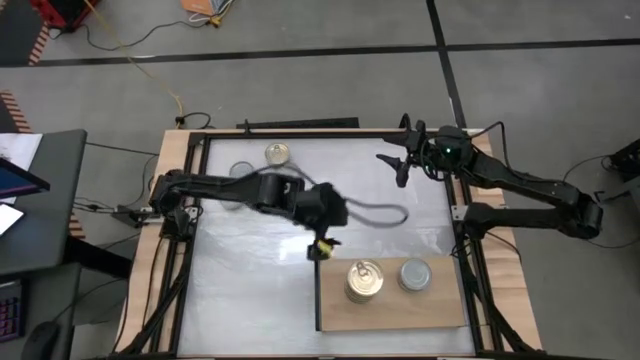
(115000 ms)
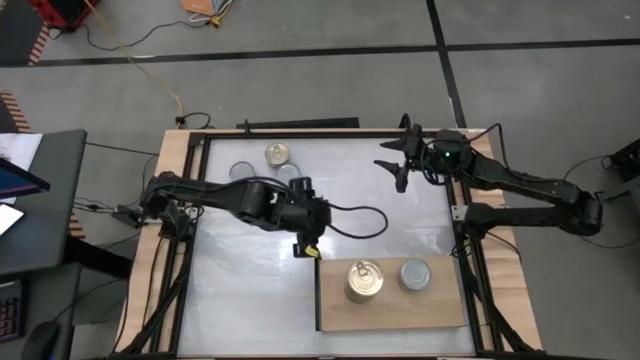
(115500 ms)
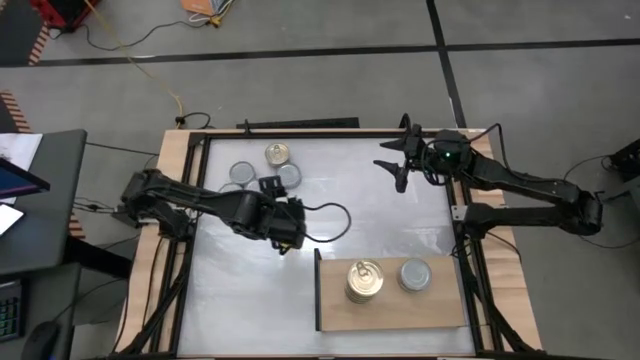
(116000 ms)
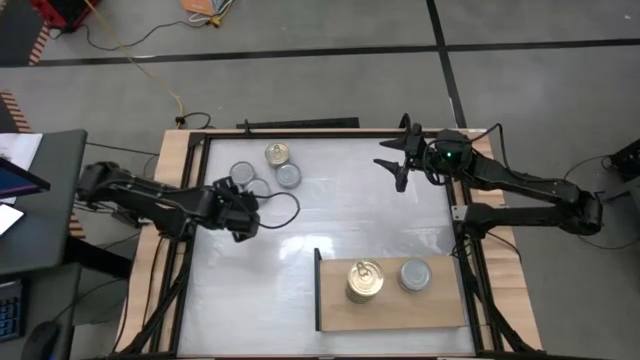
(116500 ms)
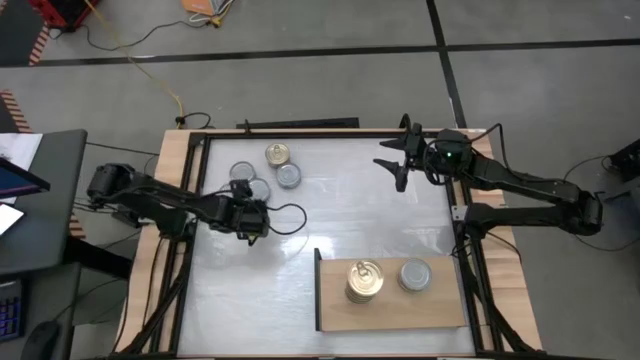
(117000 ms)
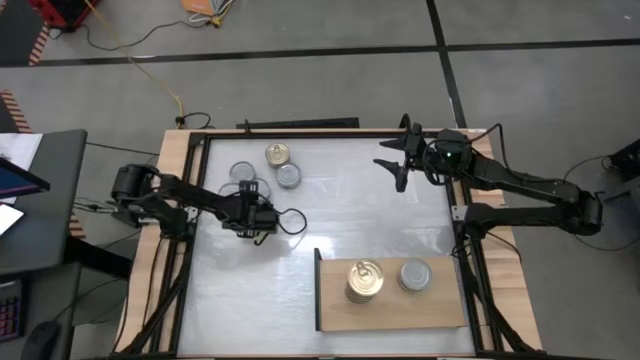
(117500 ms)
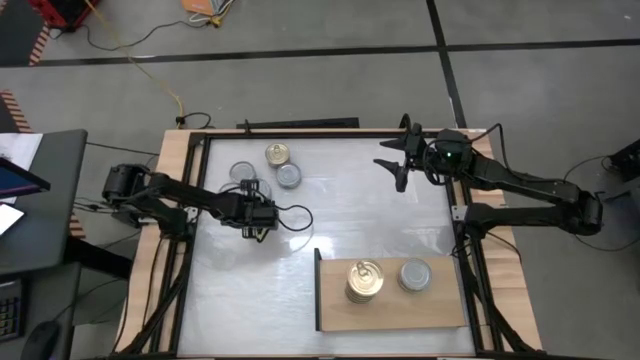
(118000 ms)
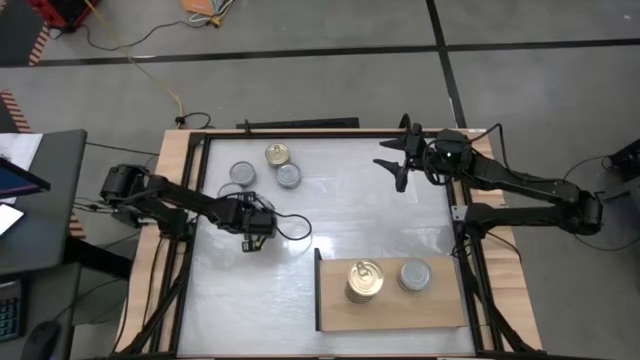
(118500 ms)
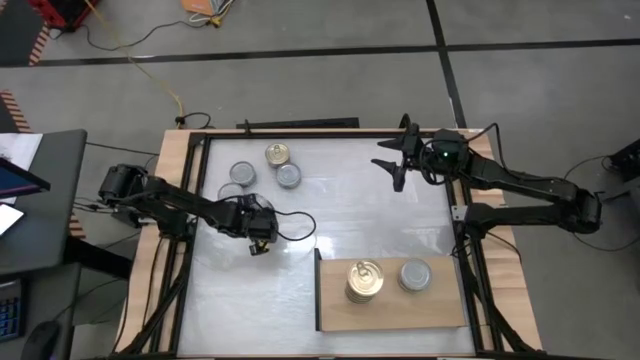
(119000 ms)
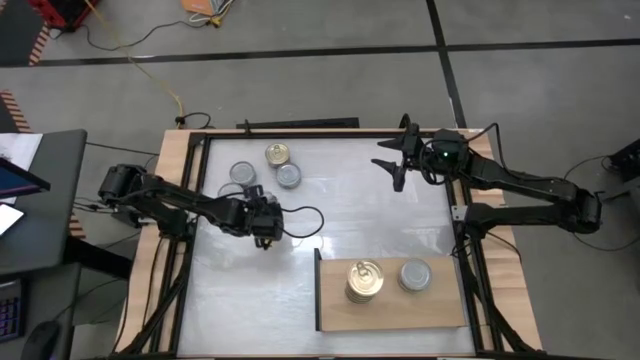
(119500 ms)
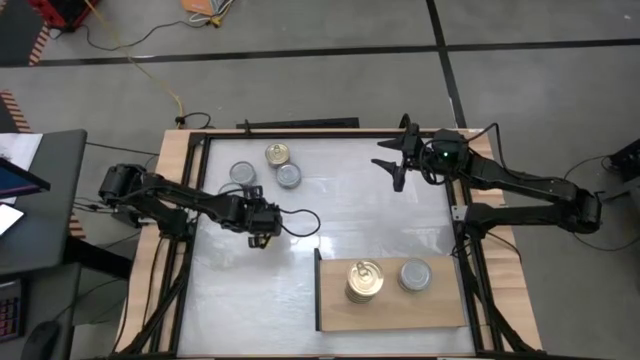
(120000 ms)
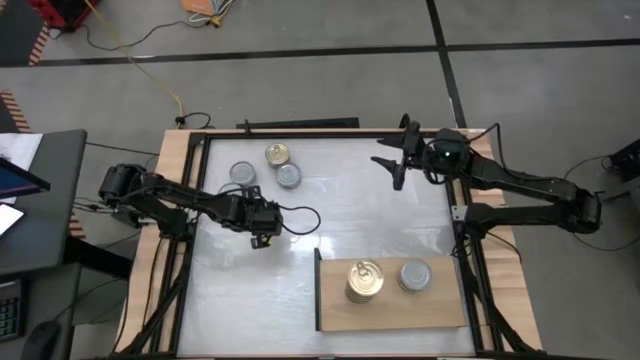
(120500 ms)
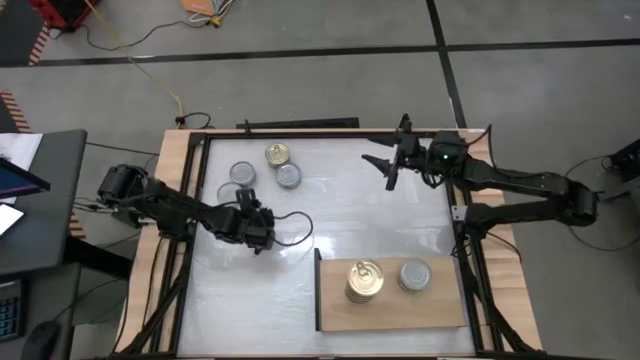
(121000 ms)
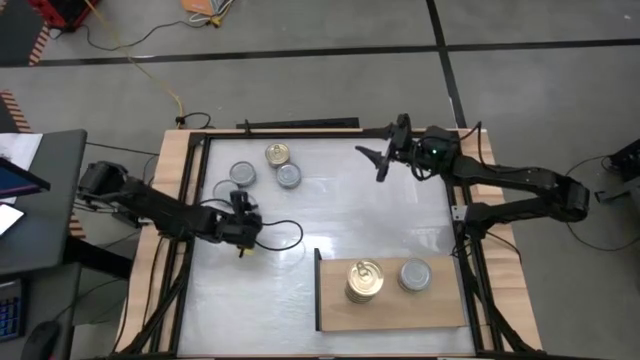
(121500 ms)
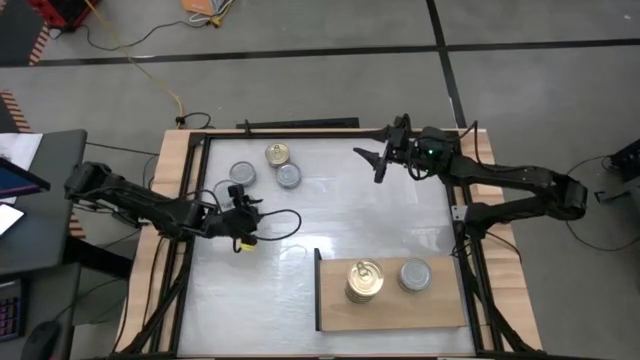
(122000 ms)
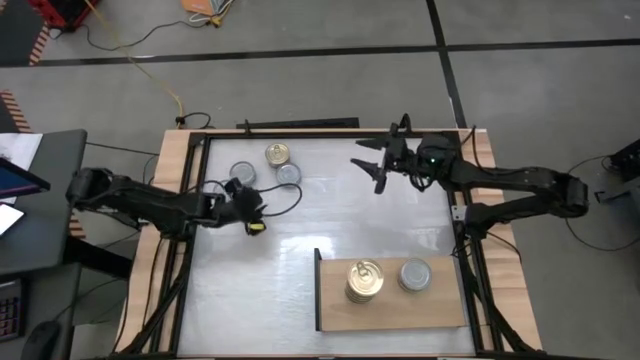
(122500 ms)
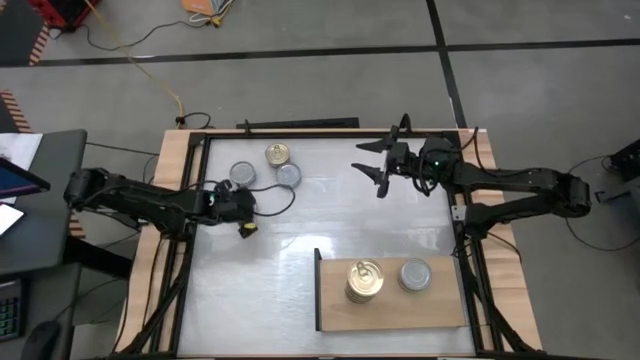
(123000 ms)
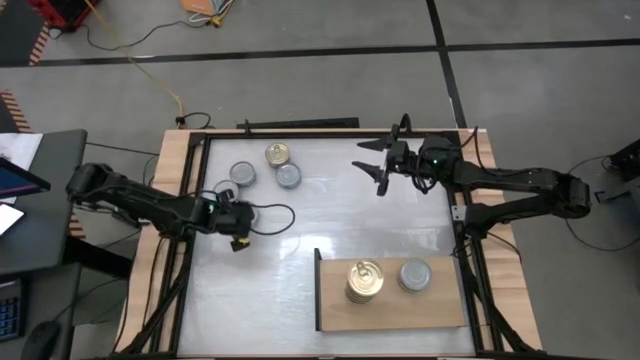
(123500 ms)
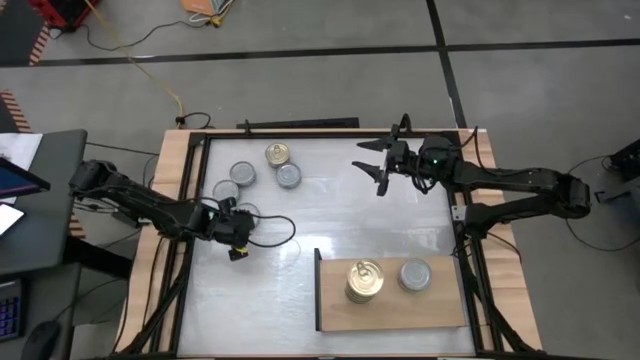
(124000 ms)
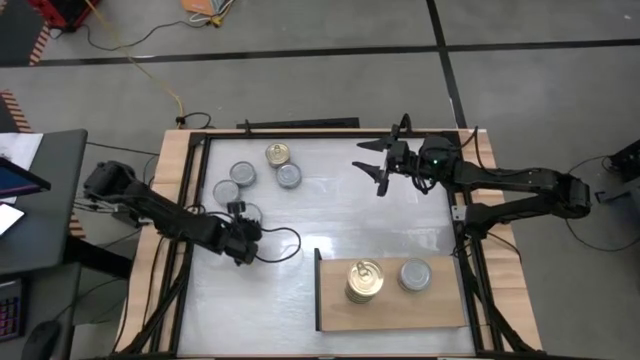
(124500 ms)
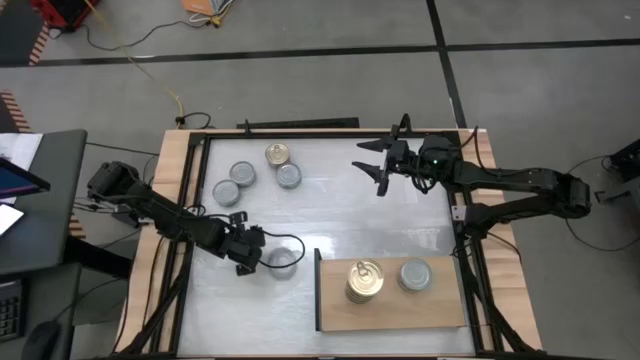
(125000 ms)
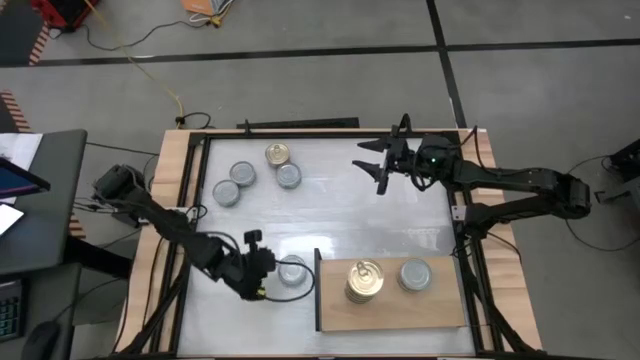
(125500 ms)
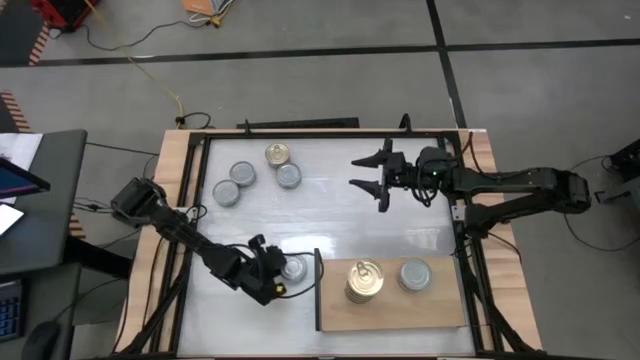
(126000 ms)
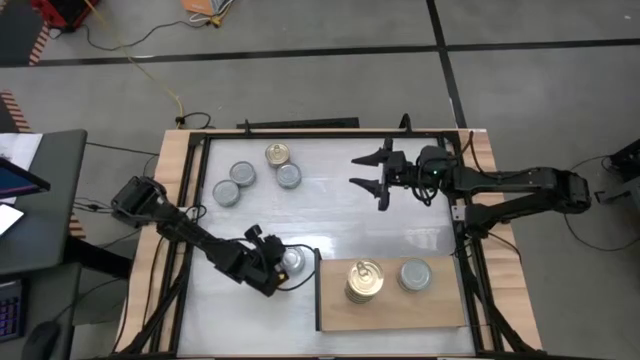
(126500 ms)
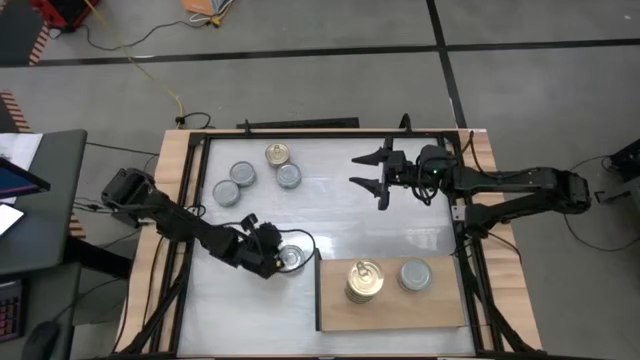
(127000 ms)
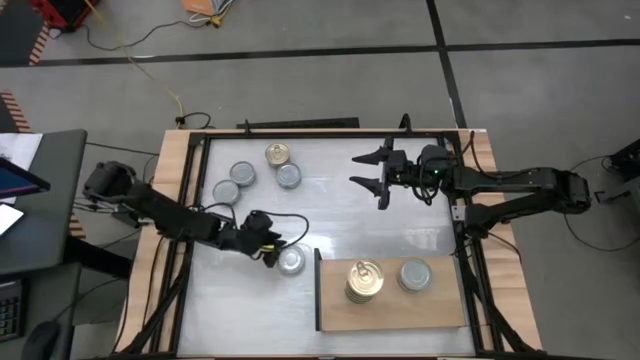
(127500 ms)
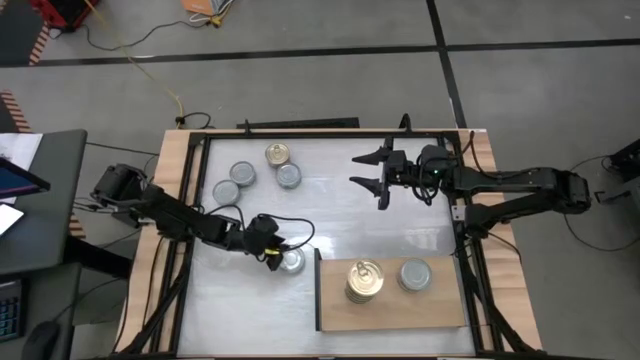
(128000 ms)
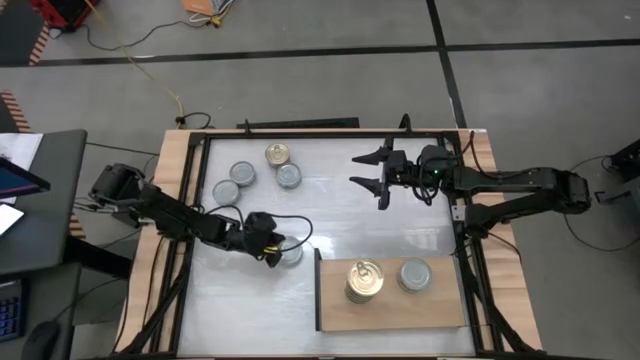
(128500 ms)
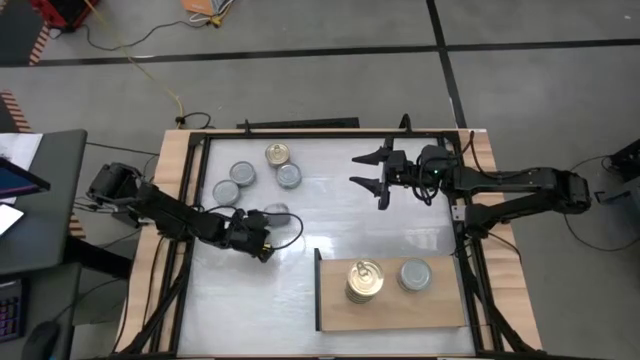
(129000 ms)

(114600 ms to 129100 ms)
Task: Stack canned seafood by type on shelf
Stack the green tuna can on top of the green tuna can on the shelf

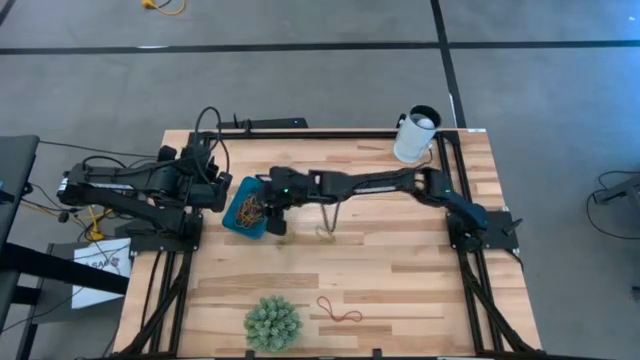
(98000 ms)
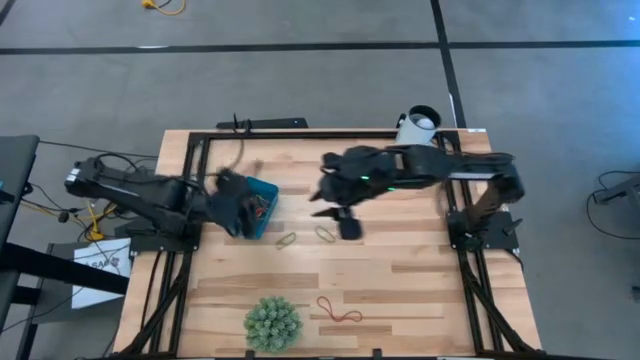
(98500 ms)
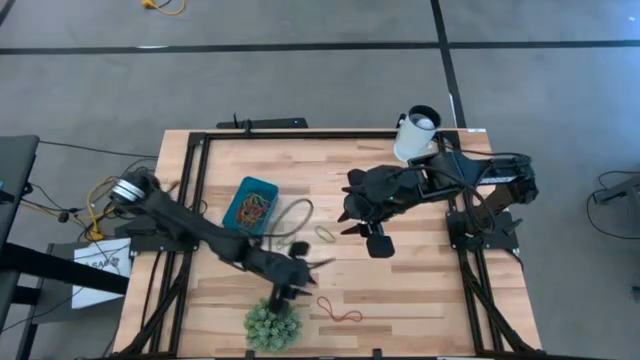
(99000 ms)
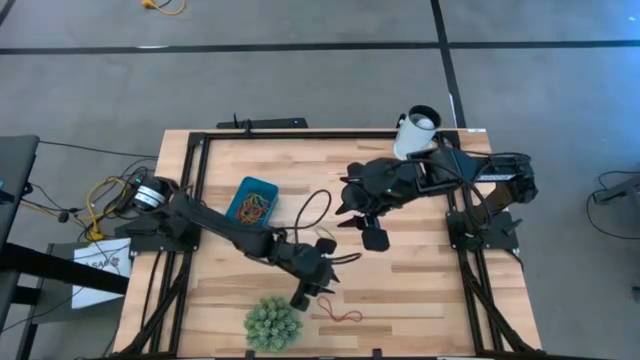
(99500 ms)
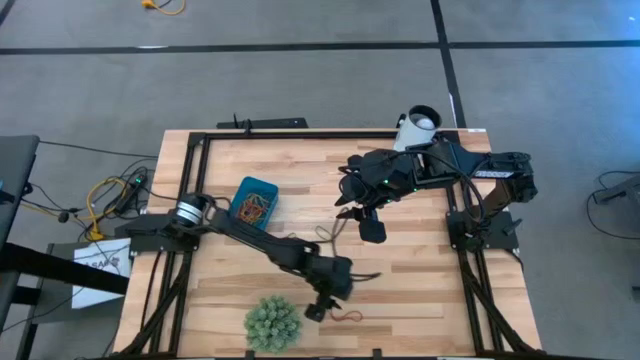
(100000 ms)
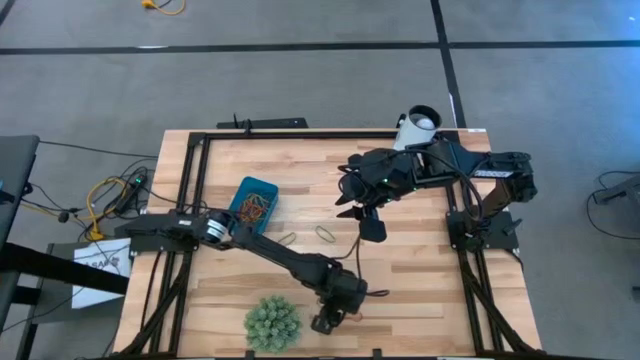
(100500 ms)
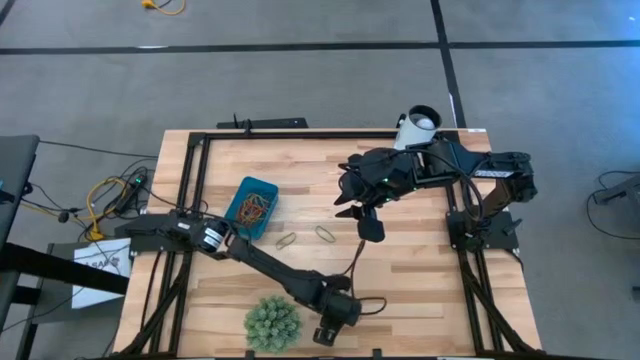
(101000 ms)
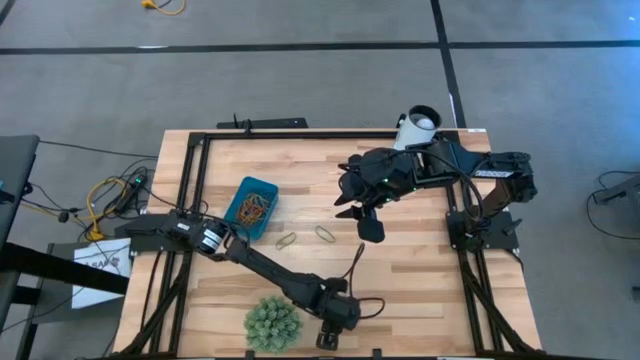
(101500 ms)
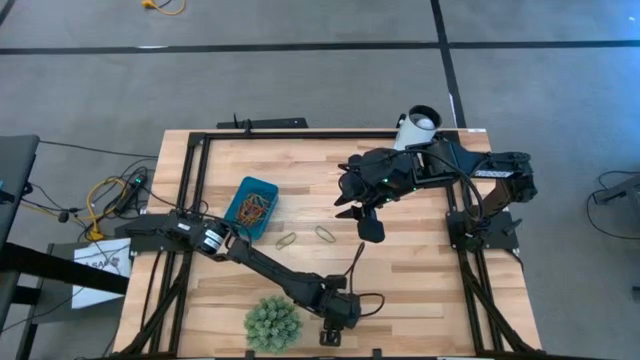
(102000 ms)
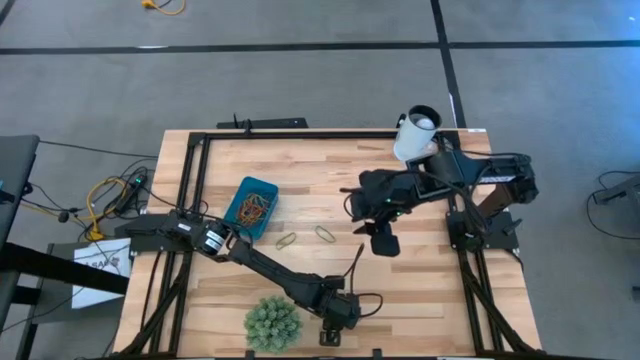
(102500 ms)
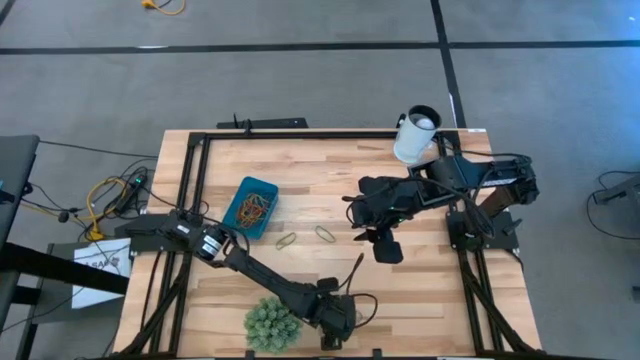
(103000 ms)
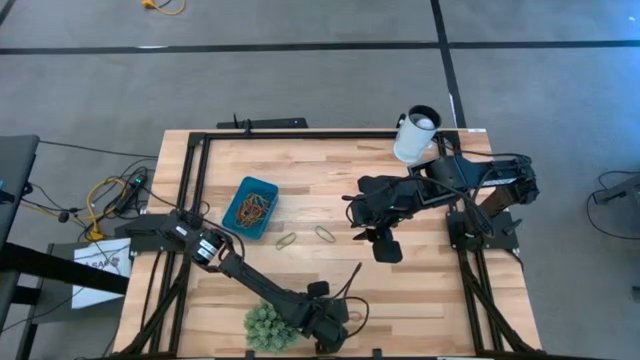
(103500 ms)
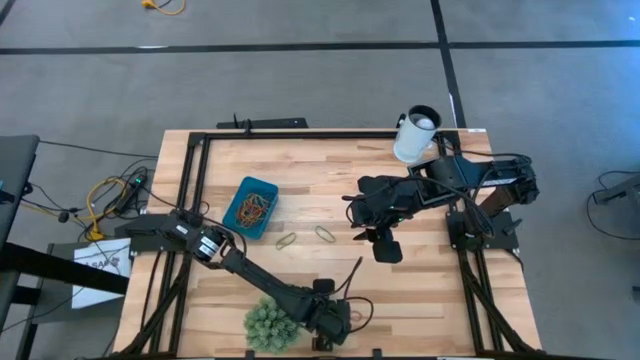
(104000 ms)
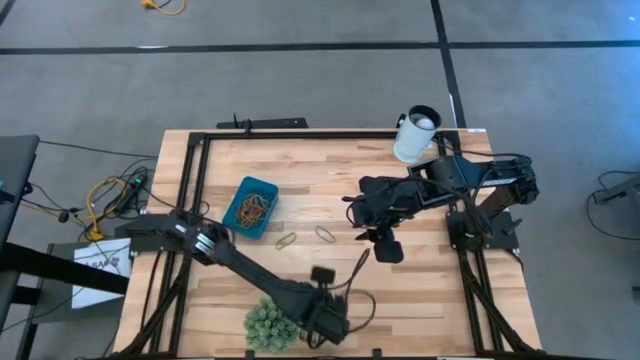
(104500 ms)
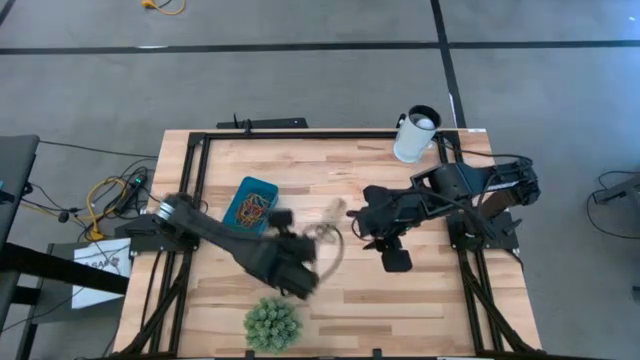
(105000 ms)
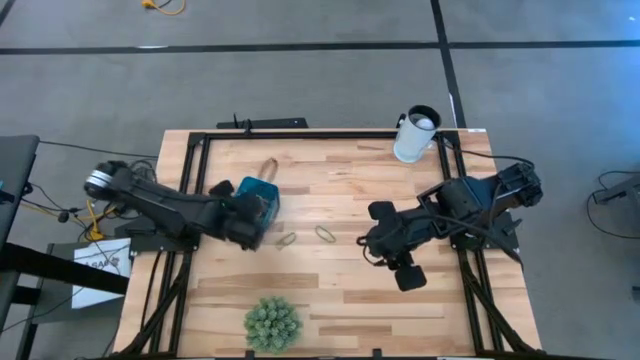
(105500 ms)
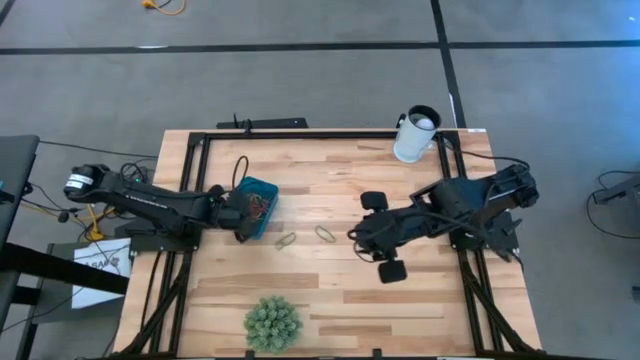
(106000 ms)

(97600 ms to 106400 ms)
Task: Pick and place items into bin
Put the red rubber band into the blue bin
